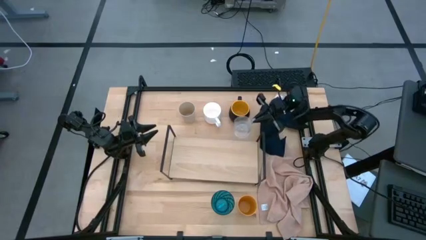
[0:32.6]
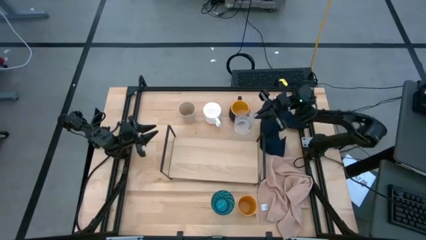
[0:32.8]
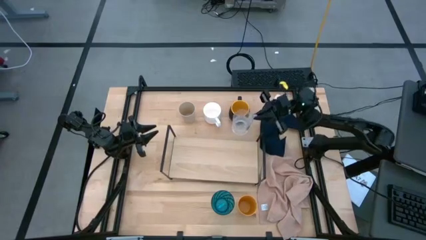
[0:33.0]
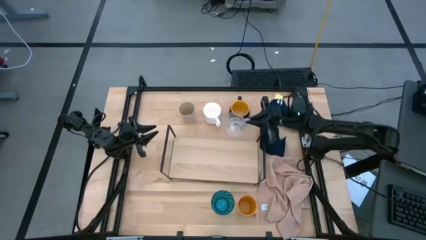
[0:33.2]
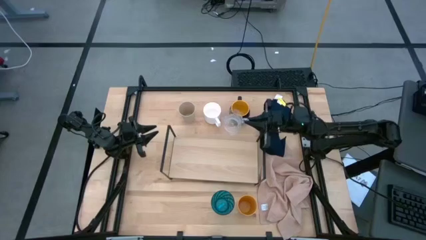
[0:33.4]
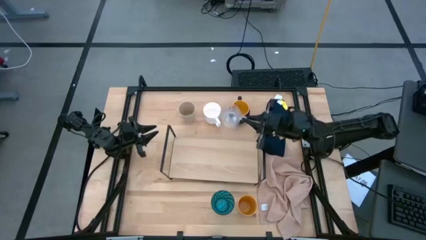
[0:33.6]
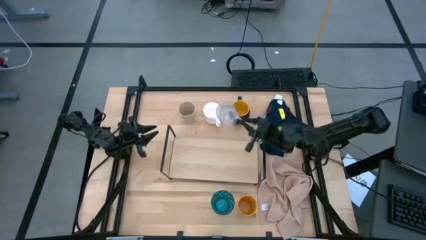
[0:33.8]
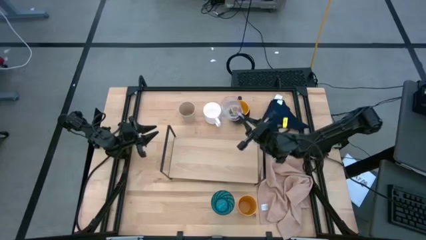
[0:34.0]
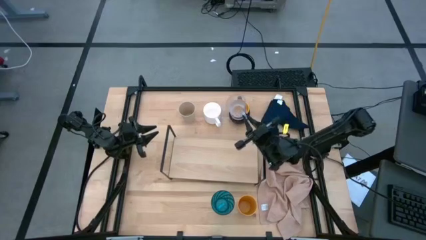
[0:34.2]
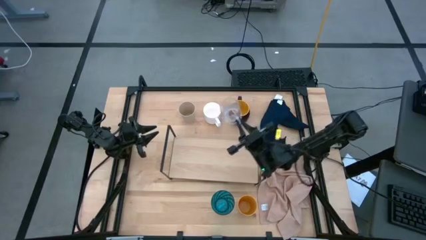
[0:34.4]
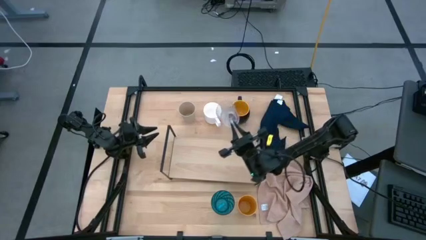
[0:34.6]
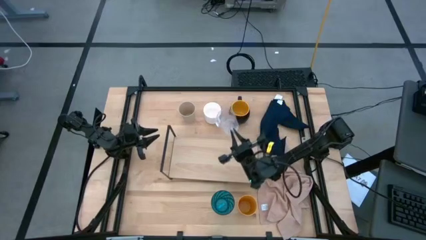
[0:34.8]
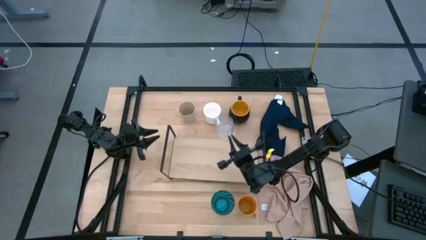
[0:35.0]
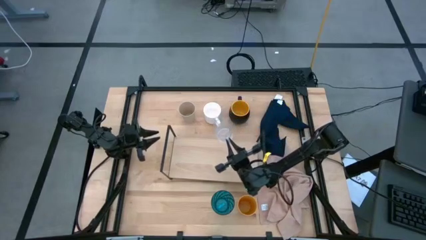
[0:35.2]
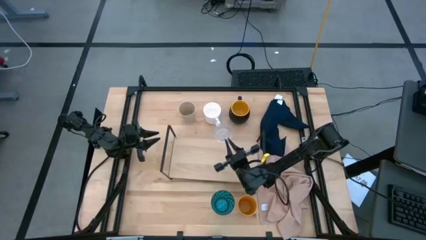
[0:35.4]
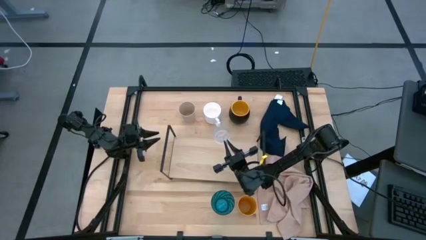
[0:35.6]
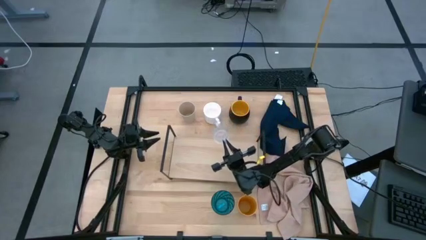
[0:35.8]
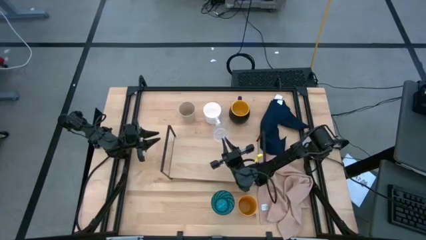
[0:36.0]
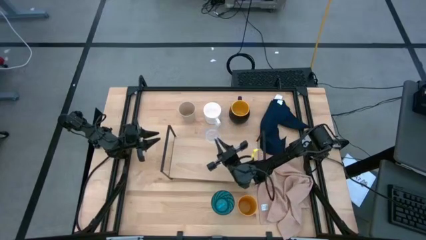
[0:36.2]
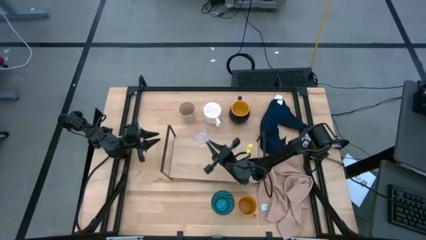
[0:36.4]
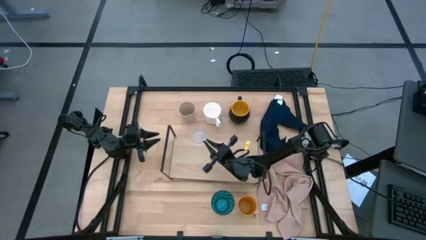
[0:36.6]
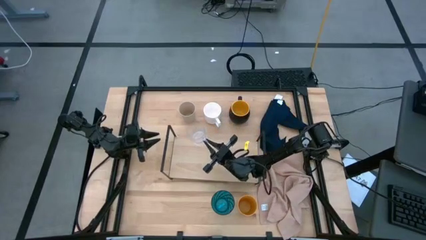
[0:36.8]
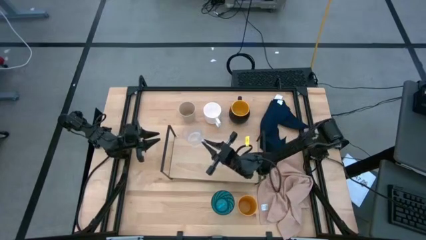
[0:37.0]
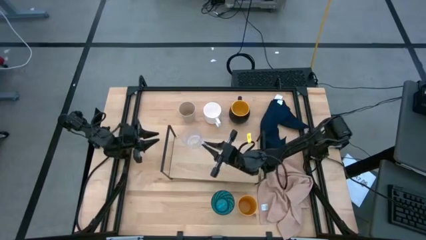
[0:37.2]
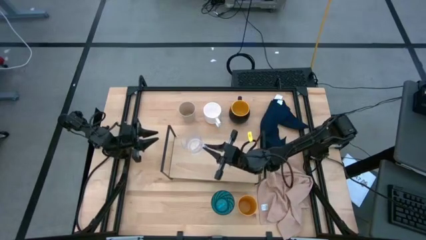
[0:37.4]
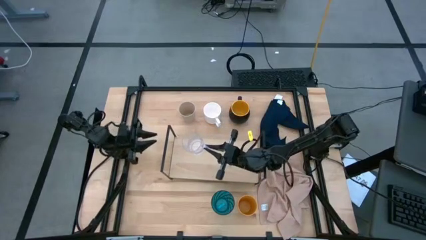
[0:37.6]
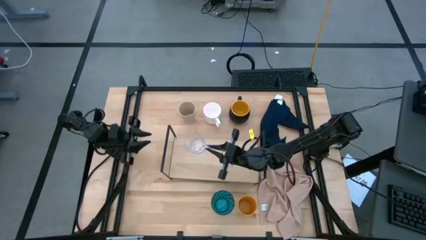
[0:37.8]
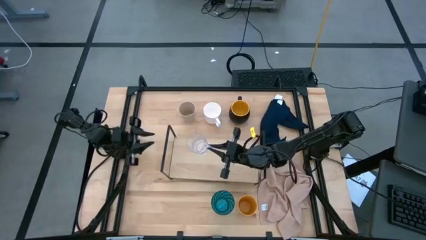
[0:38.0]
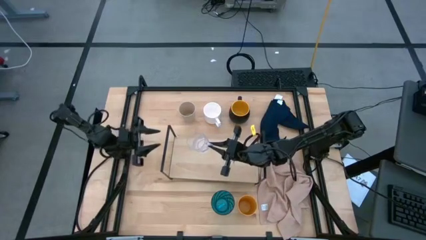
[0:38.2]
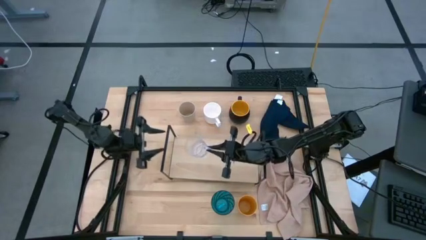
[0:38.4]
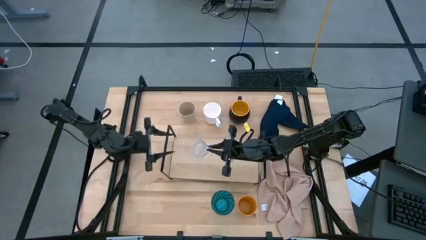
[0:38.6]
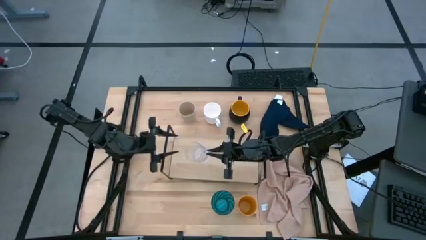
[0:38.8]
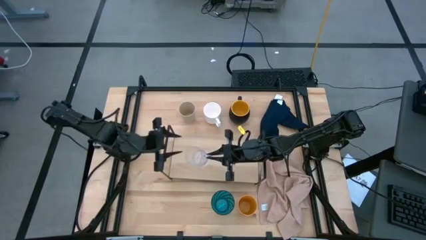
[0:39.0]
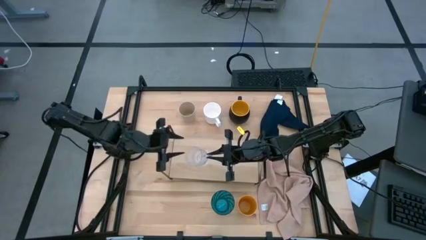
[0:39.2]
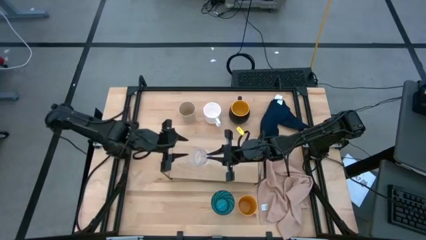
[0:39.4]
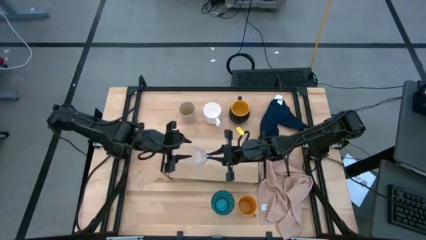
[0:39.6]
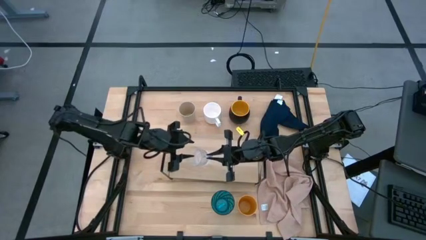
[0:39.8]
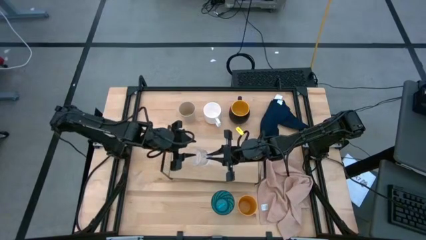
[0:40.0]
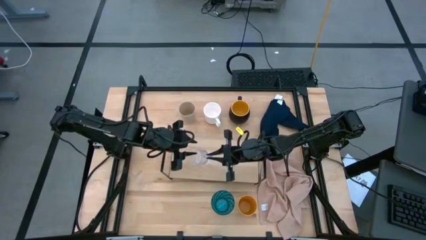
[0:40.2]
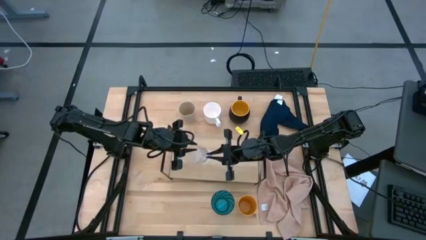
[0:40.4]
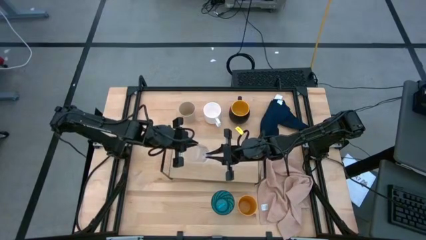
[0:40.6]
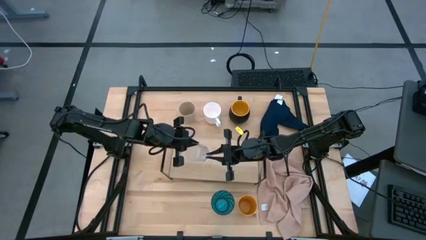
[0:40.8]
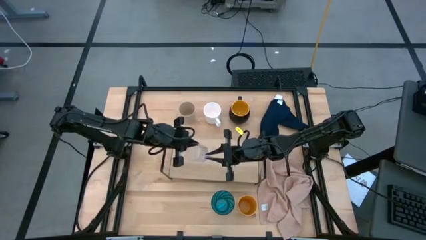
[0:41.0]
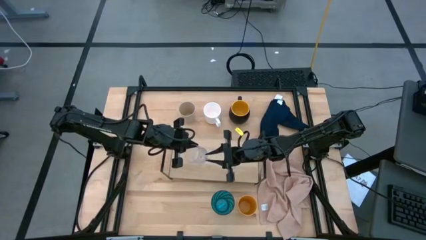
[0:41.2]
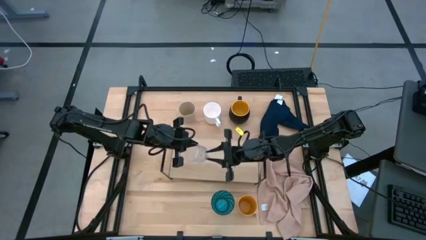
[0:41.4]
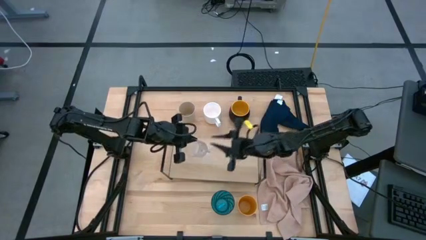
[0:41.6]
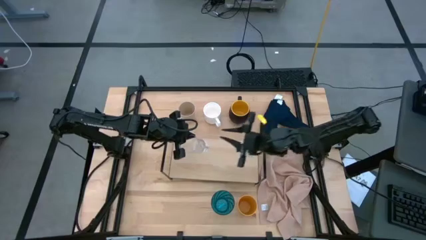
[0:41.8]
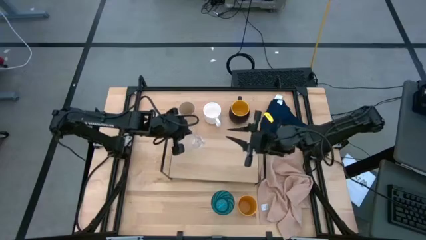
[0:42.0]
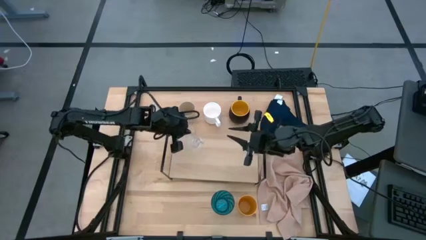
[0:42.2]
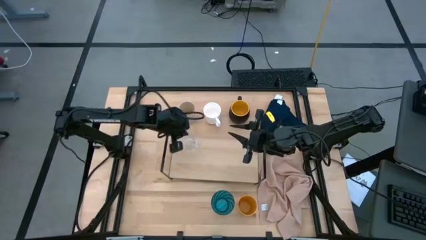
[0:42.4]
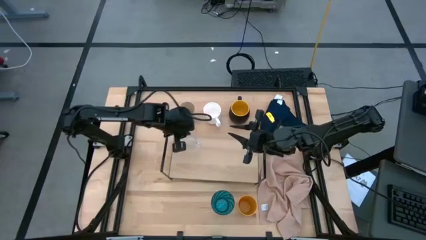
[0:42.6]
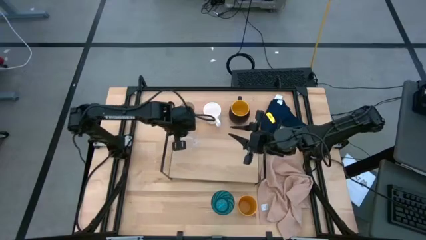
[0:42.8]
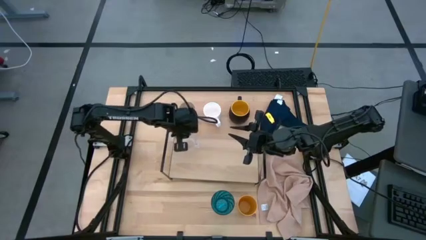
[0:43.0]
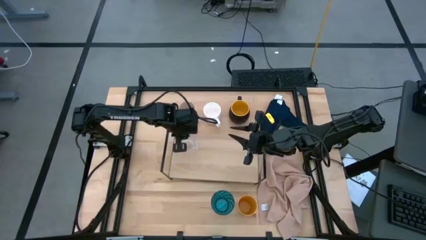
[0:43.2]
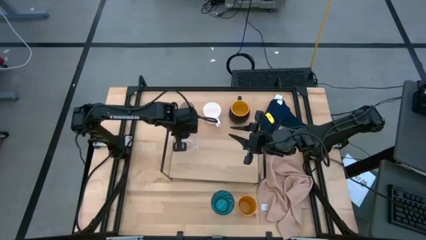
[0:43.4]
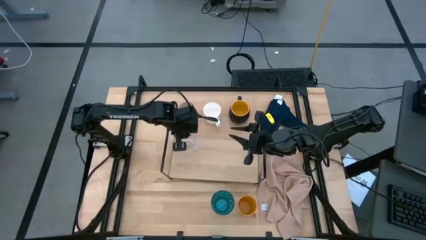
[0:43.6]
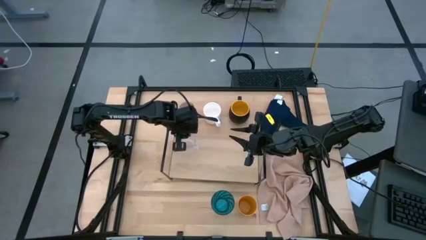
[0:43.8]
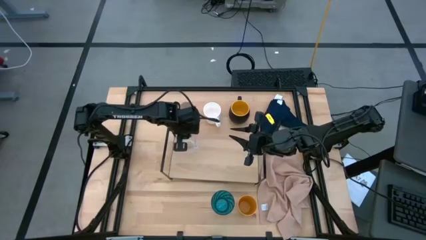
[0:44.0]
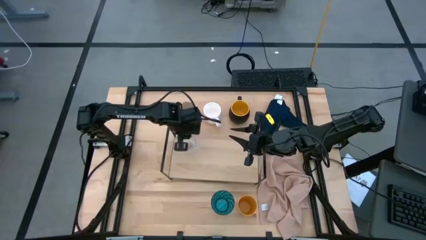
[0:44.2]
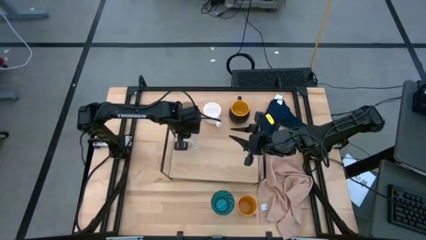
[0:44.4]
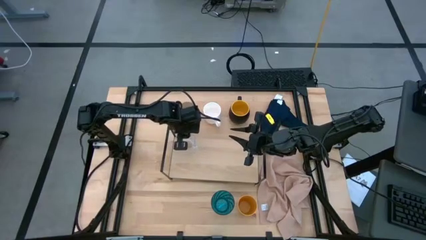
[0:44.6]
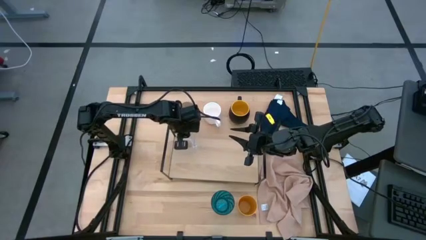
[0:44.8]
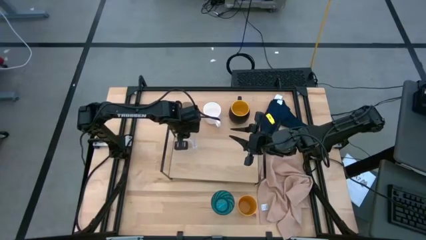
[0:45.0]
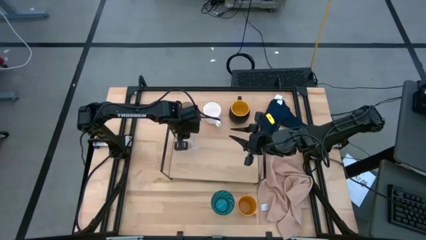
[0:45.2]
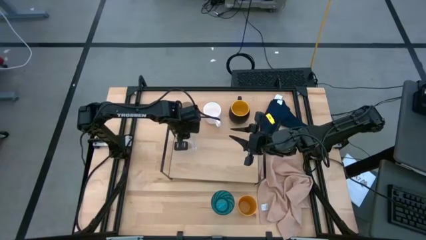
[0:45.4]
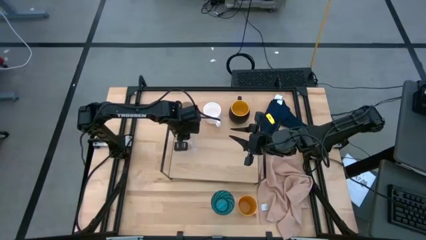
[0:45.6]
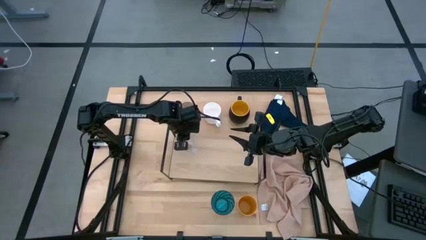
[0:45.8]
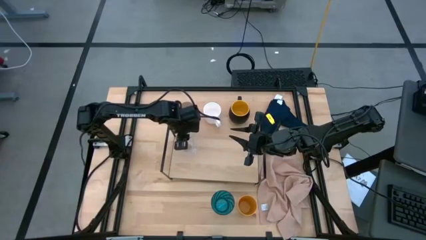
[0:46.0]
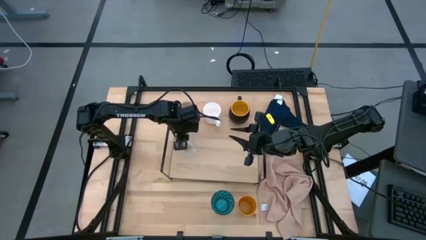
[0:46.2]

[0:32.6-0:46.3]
Task: Stack small to large cups/mugs on shelf
Put the transparent mug on the shelf

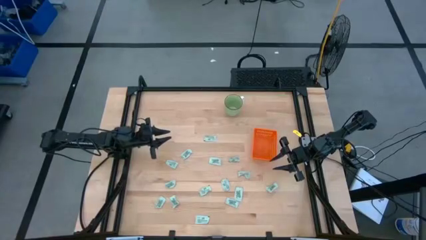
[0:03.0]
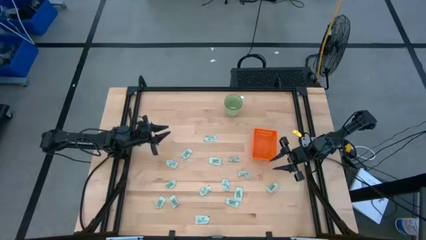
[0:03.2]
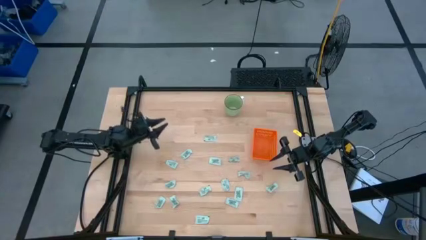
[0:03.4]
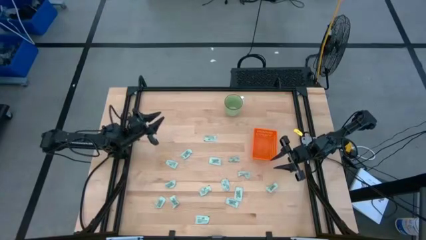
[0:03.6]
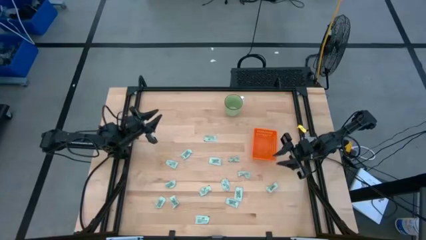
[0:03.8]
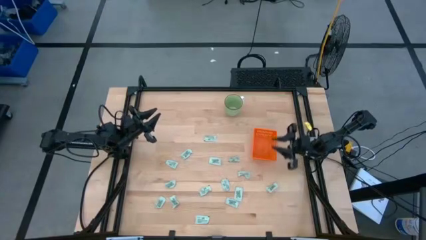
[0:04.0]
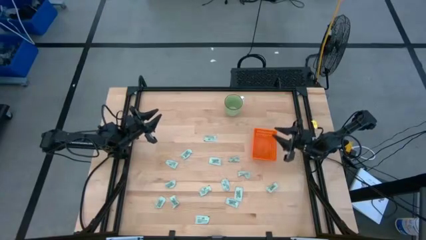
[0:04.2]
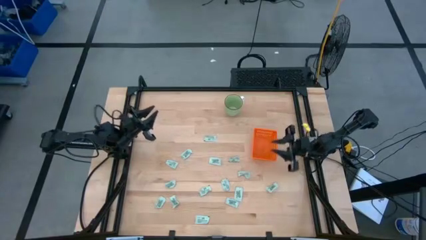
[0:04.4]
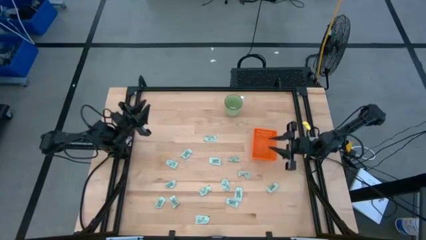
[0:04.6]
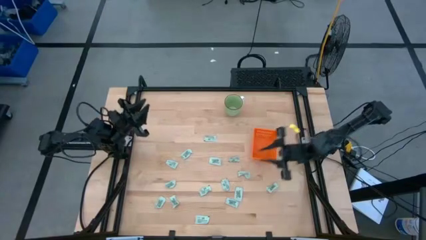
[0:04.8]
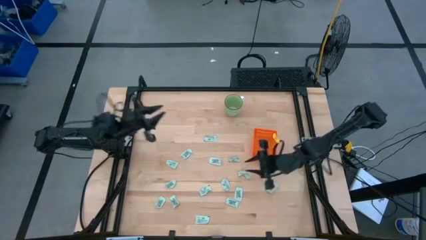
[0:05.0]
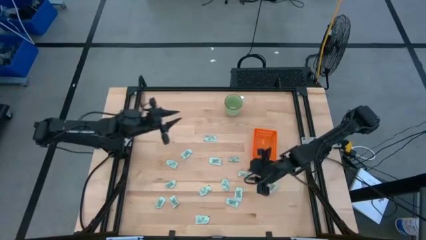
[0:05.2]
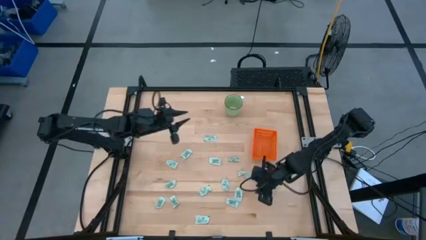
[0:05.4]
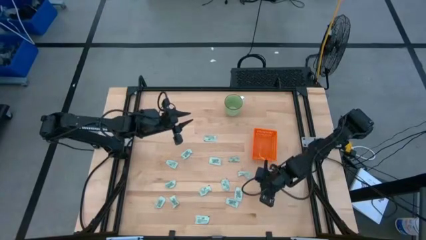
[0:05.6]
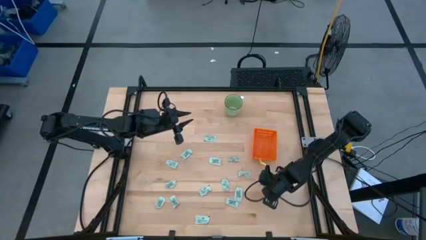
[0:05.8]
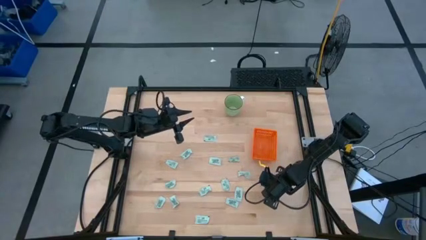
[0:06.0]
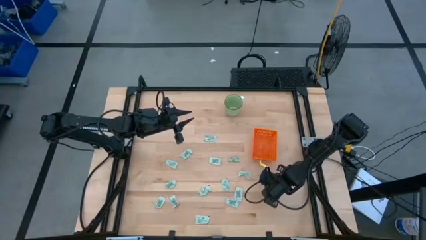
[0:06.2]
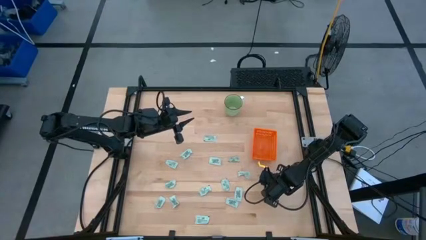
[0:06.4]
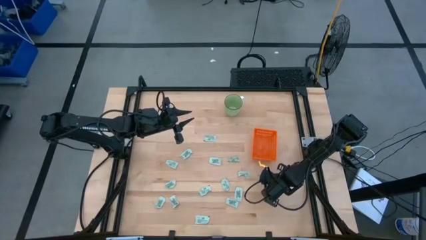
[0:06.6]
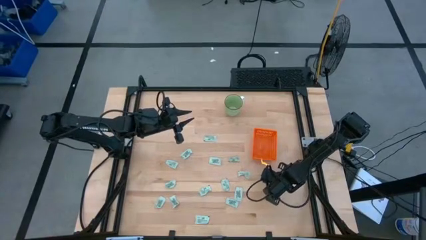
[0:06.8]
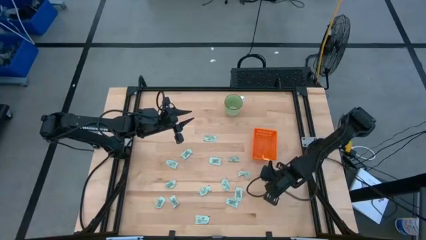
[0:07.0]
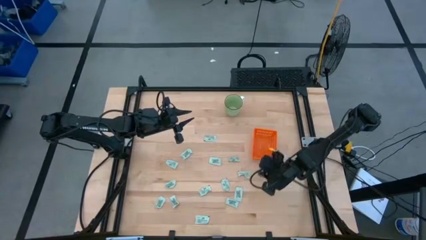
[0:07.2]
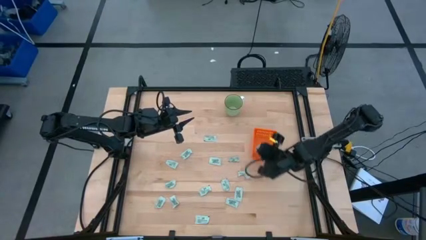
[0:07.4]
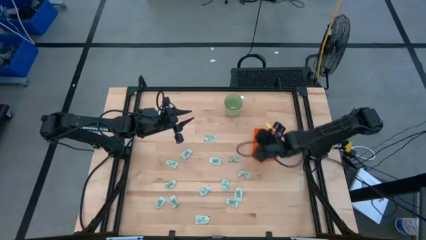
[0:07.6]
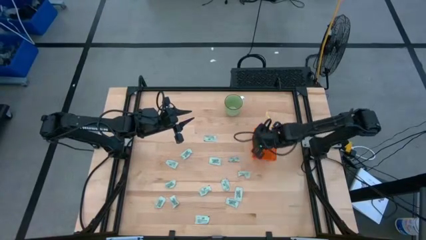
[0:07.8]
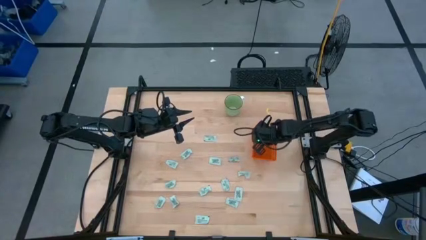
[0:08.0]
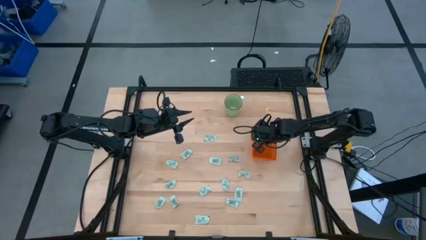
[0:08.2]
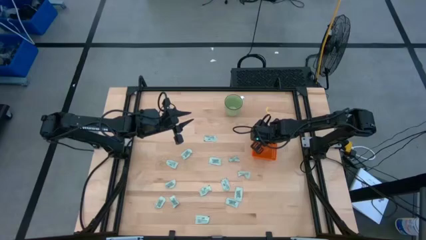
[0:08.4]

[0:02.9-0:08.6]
Task: Pick and place Stevia / Truvia into bins
Put the light green packet into the orange basket
